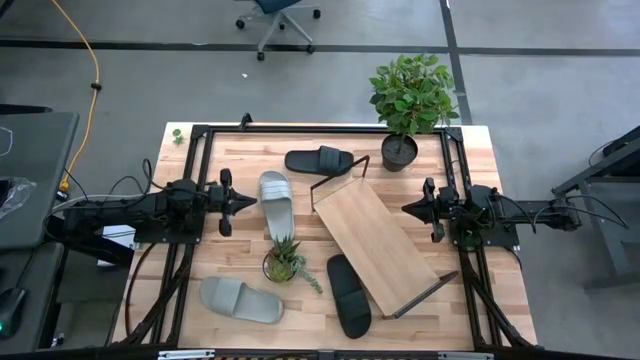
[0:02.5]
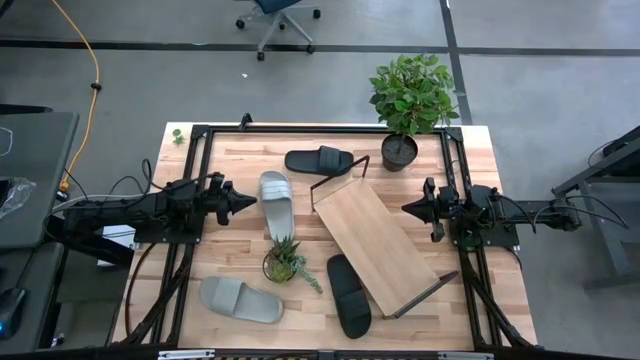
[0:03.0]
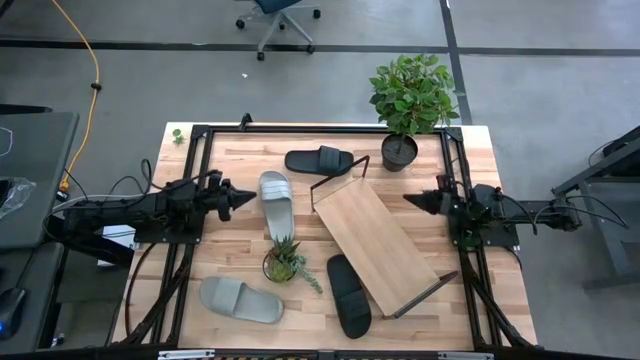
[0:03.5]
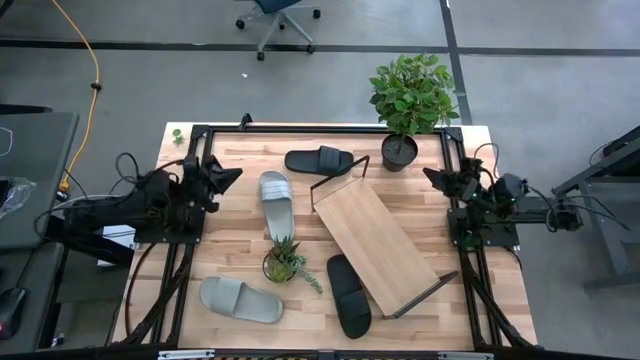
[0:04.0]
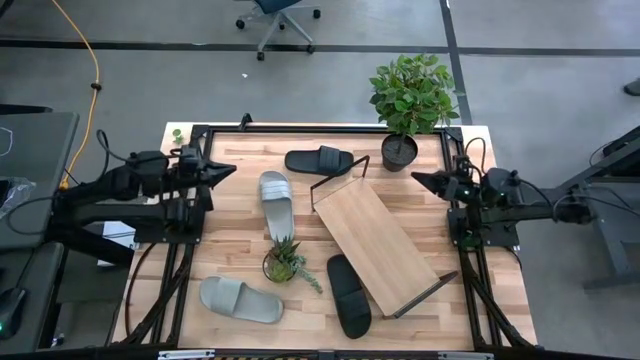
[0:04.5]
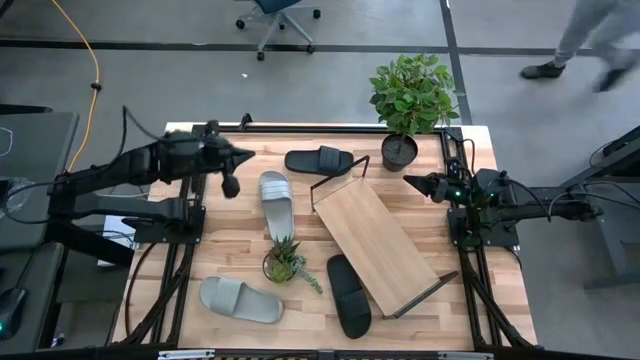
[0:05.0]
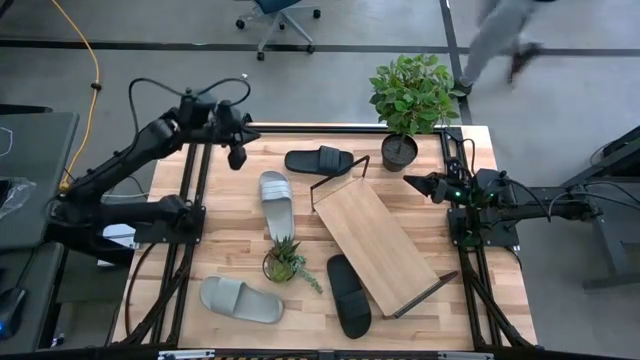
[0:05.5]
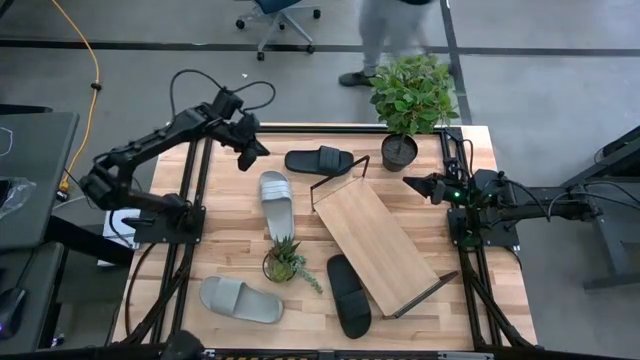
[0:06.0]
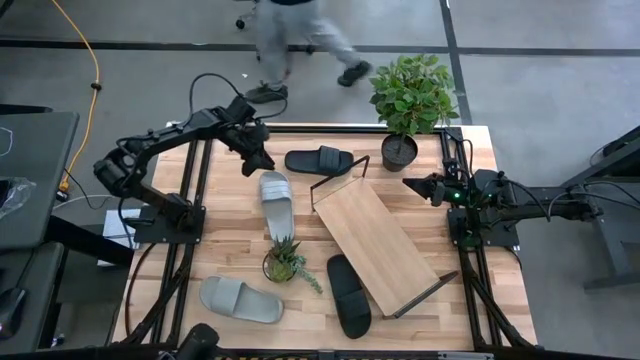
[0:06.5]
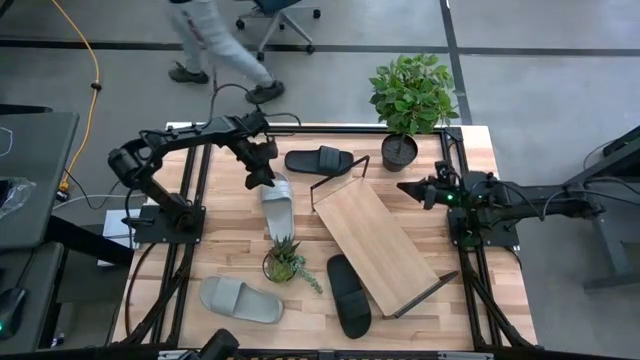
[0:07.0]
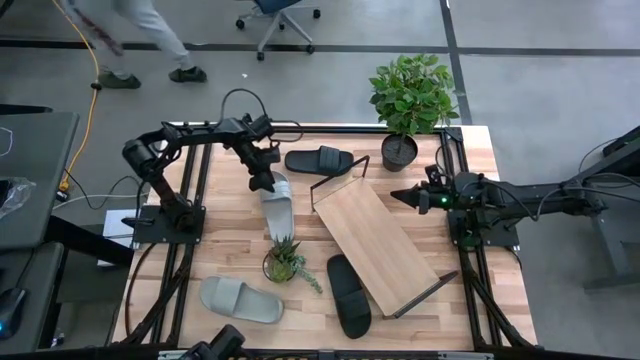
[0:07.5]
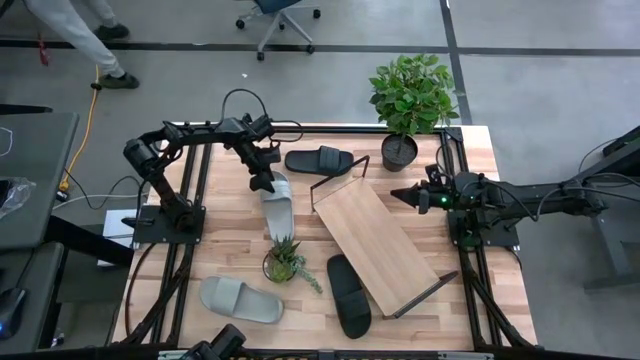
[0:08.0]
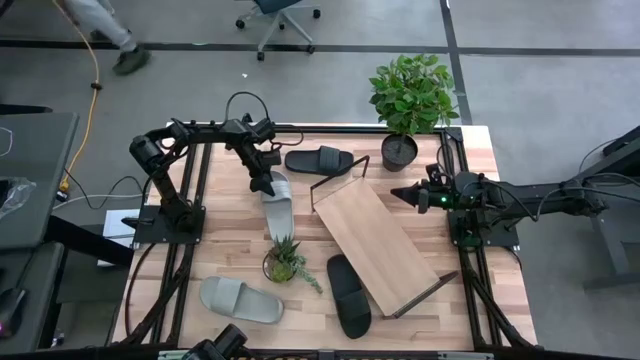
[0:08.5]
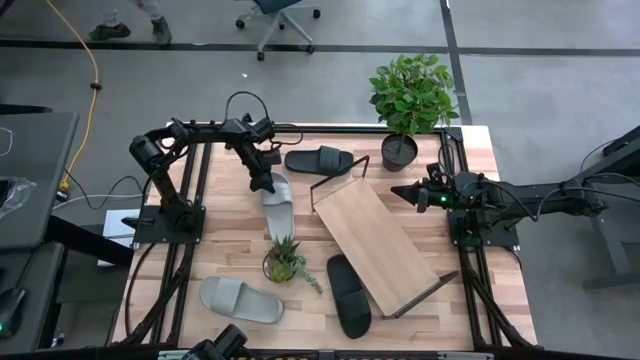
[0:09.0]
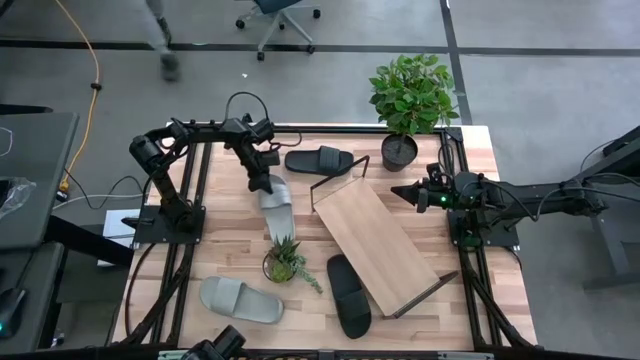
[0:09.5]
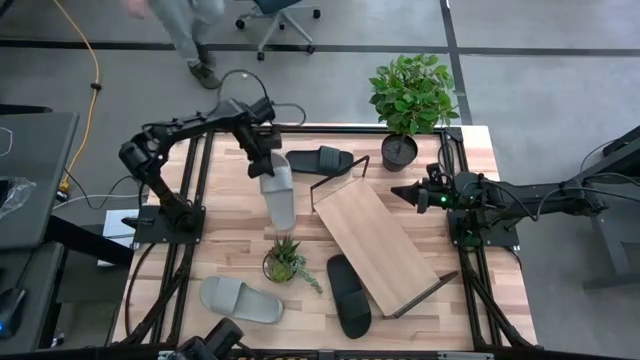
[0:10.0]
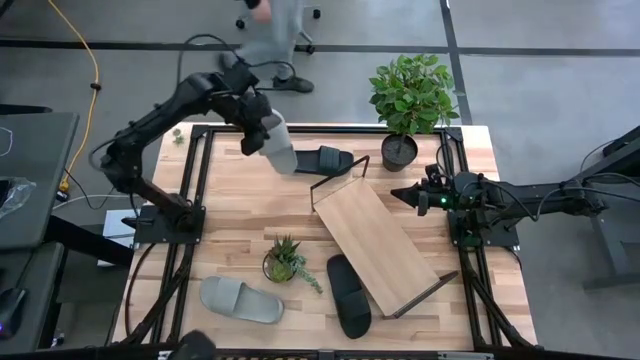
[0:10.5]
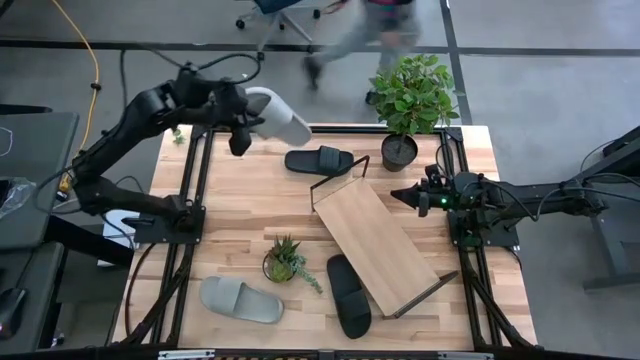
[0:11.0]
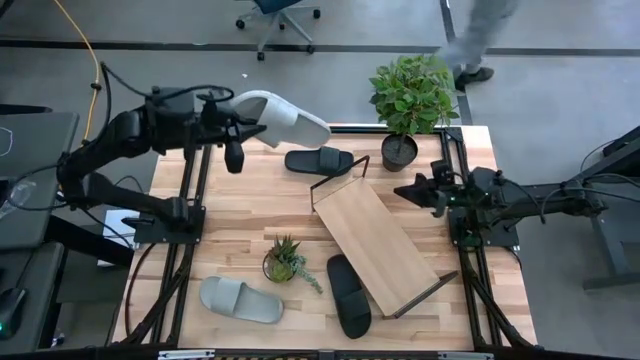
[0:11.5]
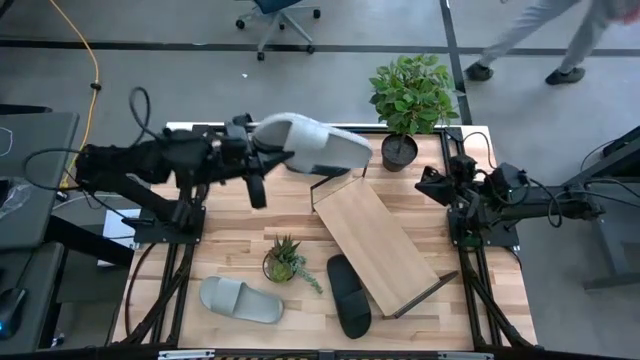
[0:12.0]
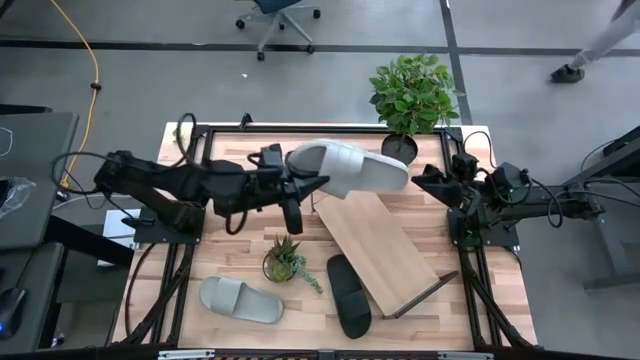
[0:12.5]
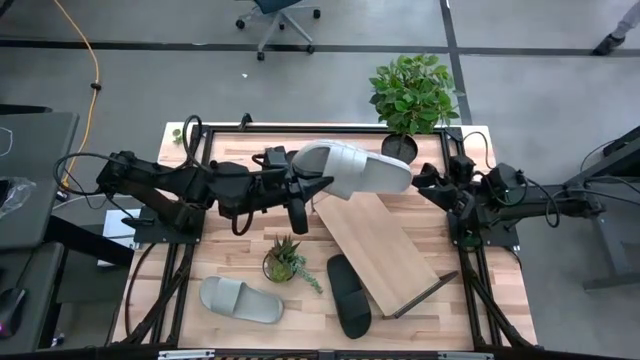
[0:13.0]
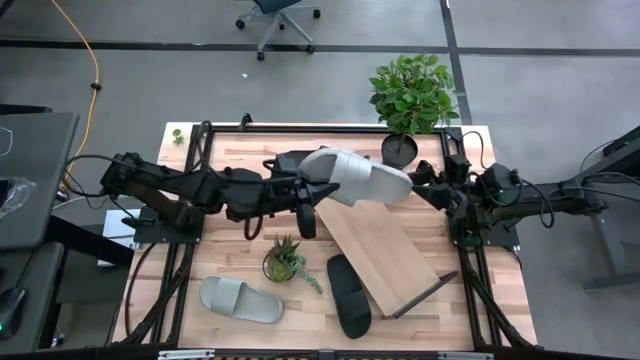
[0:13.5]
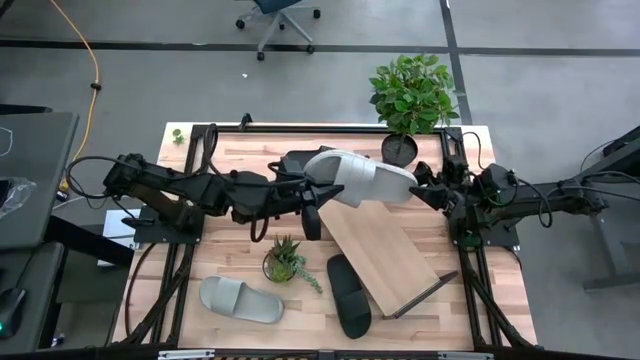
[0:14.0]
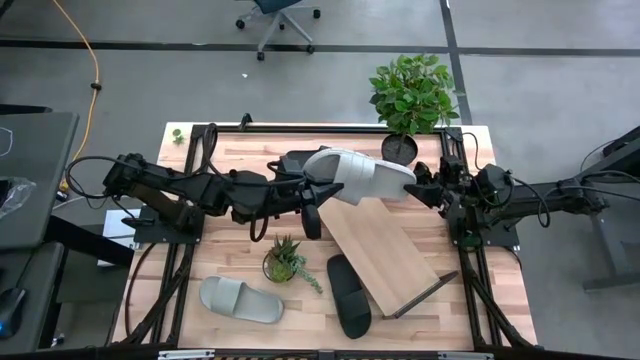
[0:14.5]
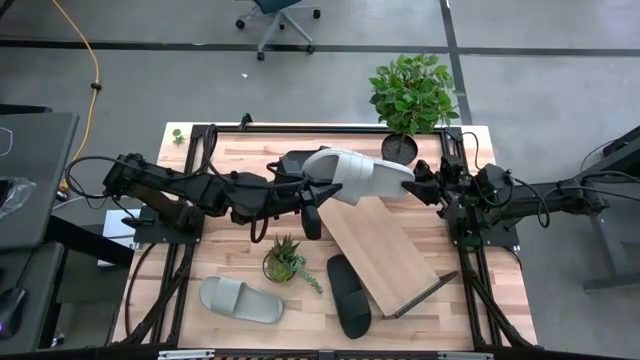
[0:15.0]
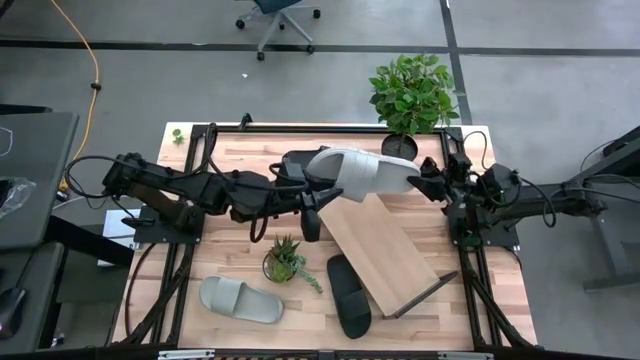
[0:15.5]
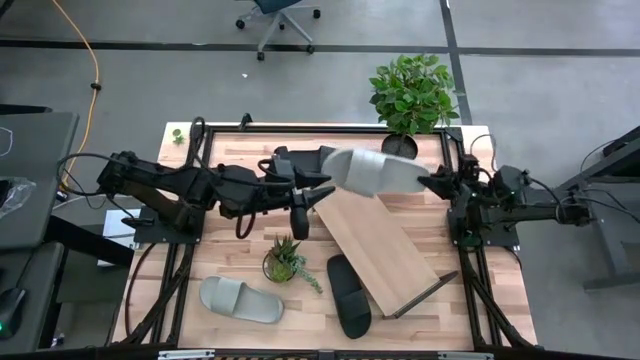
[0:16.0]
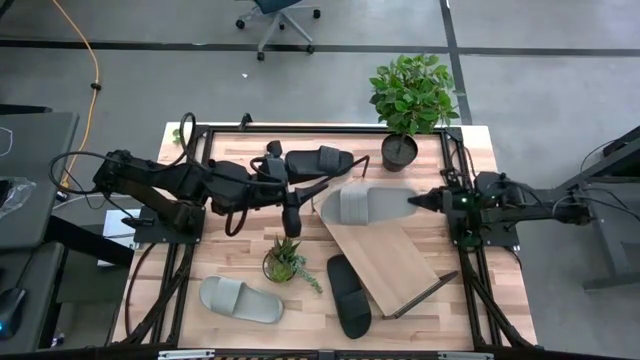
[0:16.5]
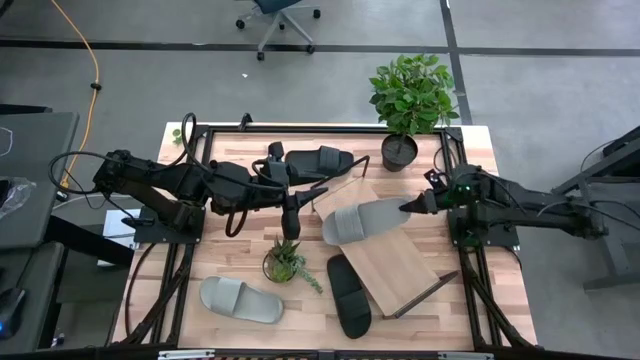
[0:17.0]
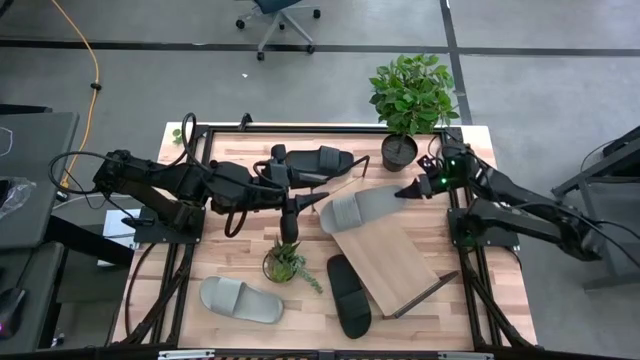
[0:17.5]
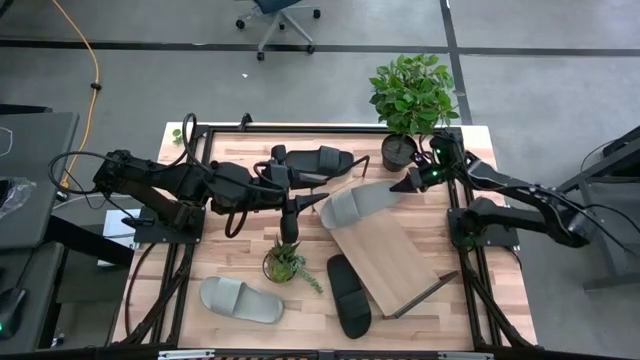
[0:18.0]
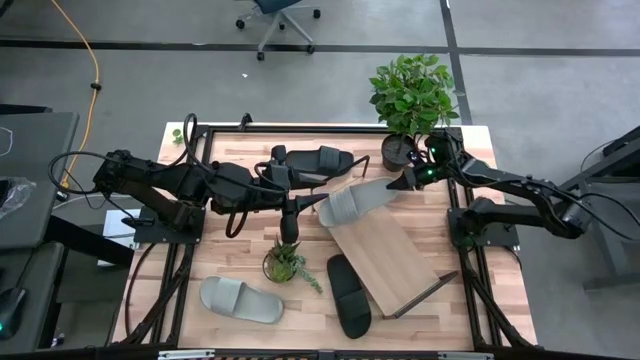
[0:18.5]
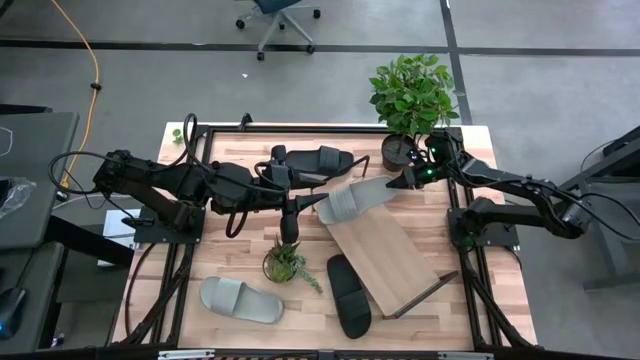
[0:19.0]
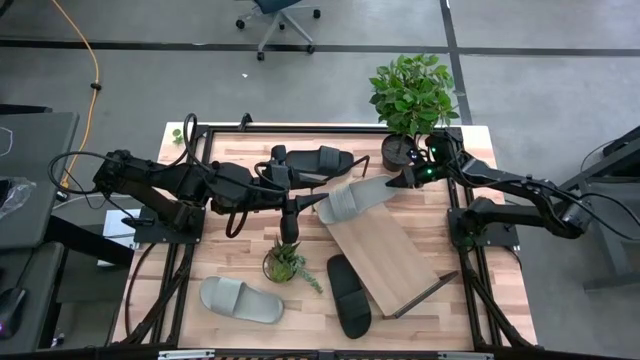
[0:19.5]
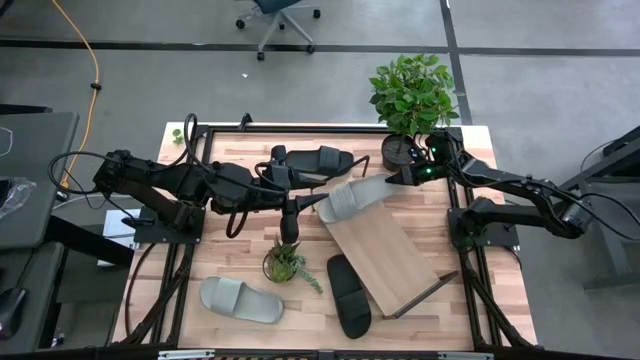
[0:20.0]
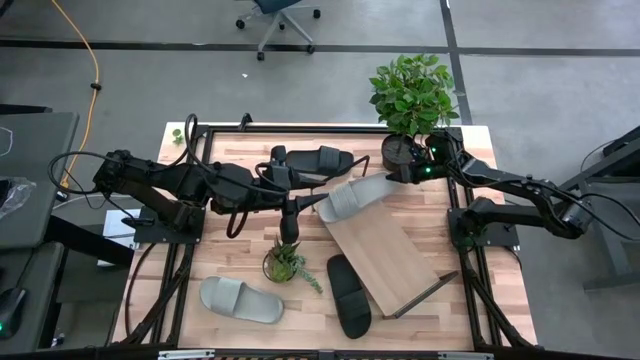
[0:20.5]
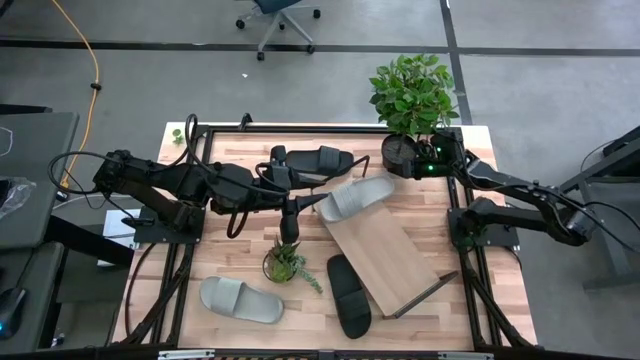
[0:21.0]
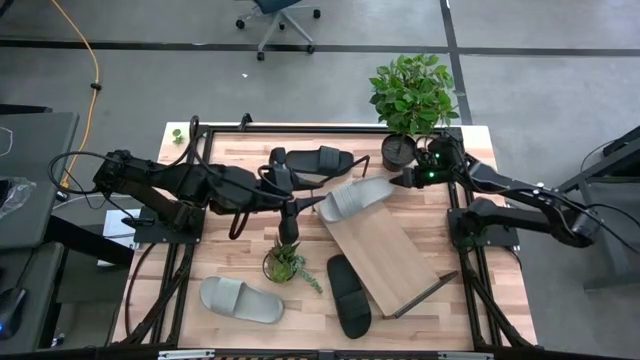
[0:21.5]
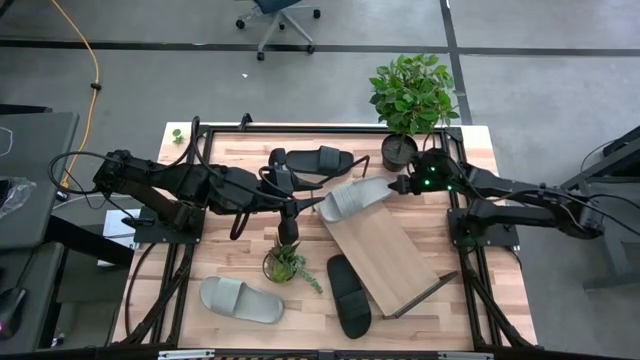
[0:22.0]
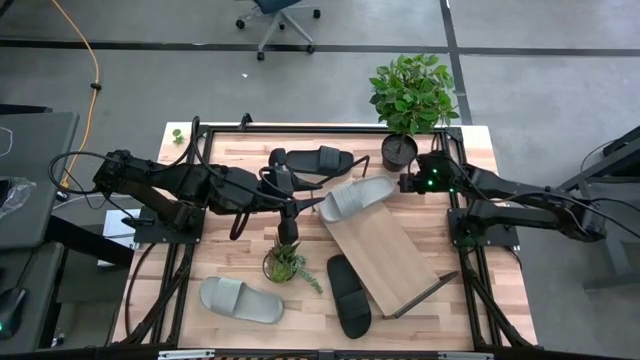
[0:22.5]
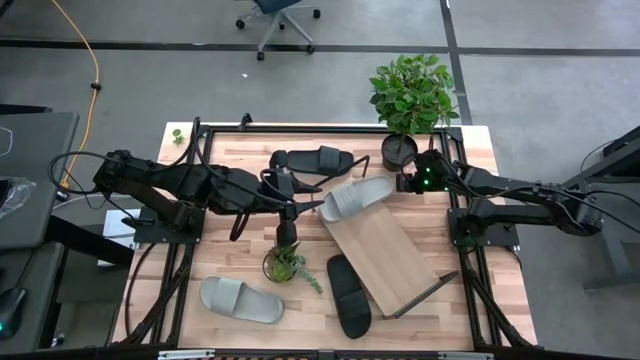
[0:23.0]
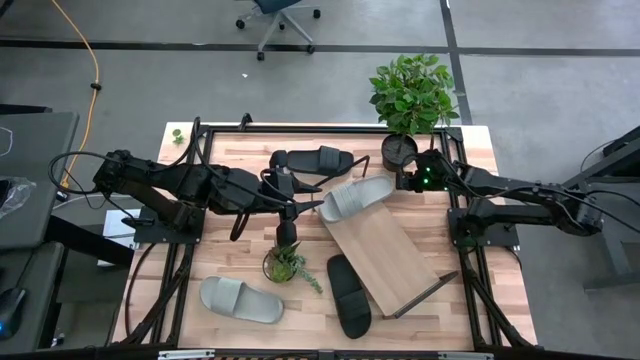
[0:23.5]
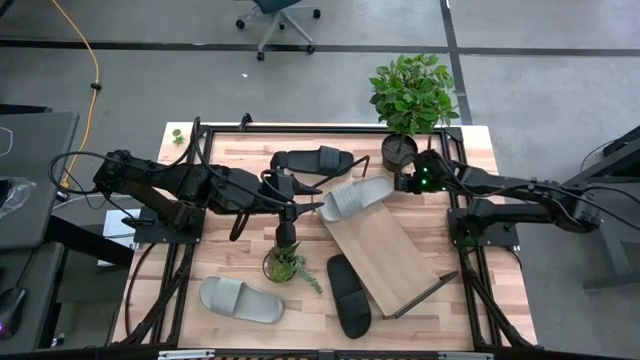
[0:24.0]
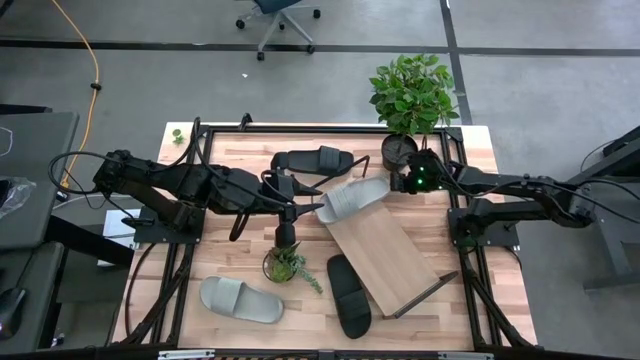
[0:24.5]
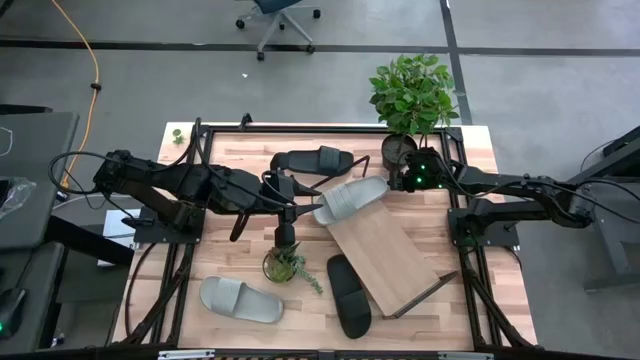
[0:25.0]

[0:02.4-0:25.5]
Task: Pick and place slides into the shelf
Put the top gray slide on the shelf
